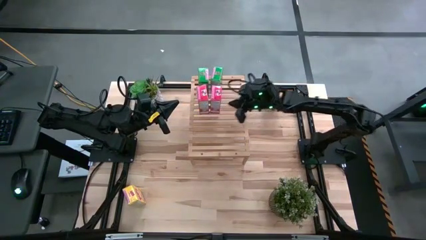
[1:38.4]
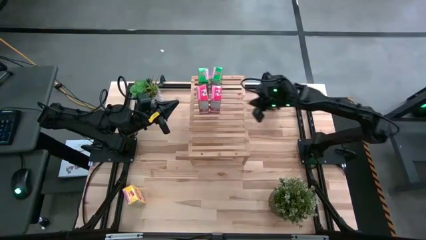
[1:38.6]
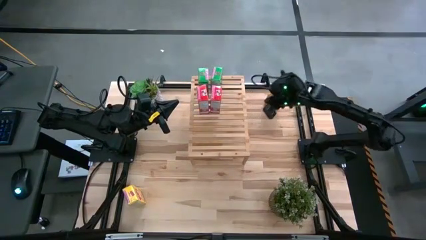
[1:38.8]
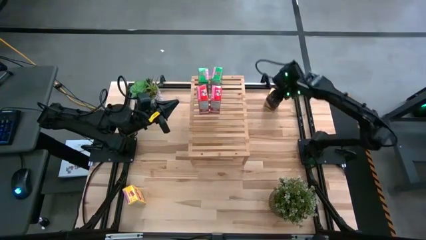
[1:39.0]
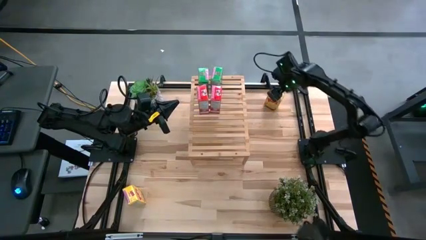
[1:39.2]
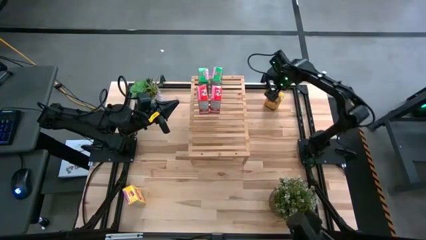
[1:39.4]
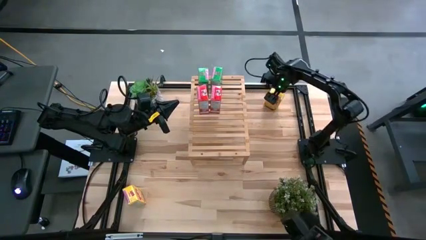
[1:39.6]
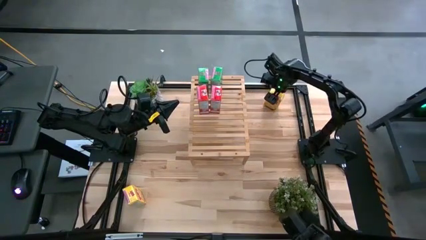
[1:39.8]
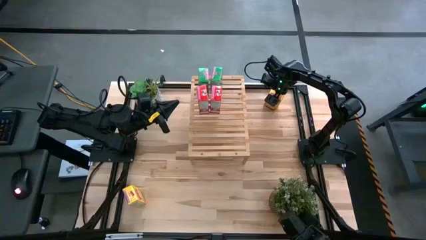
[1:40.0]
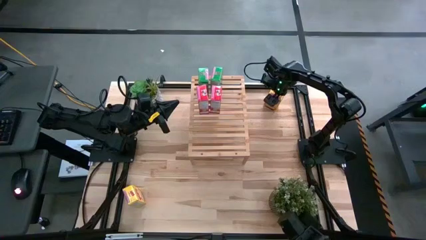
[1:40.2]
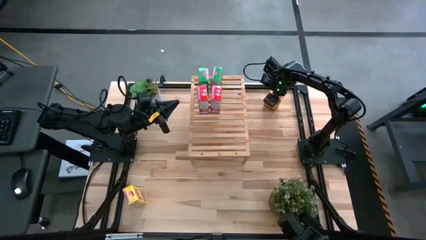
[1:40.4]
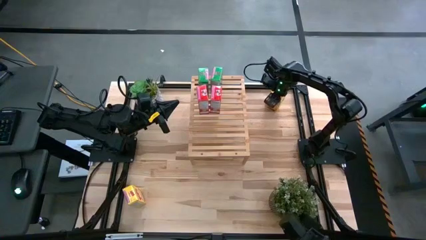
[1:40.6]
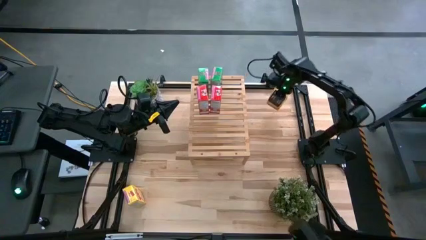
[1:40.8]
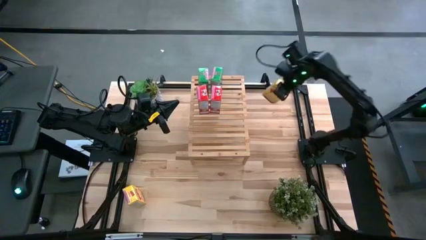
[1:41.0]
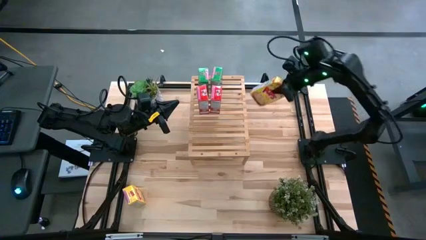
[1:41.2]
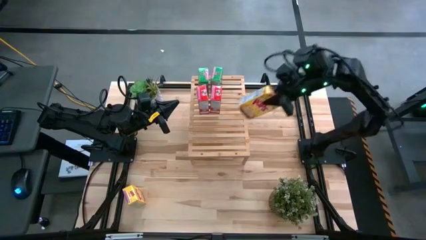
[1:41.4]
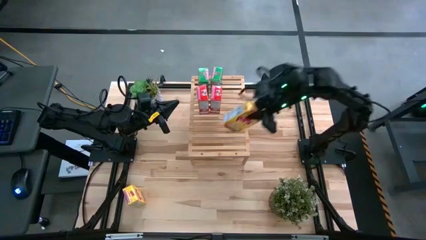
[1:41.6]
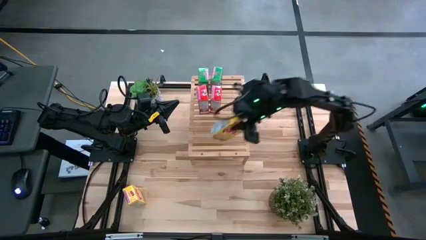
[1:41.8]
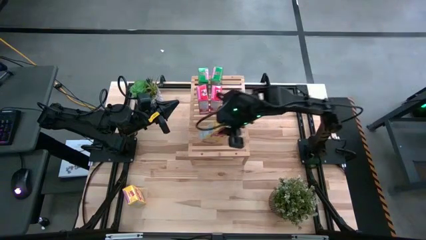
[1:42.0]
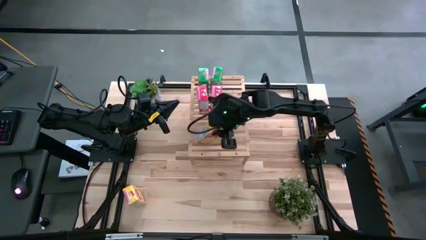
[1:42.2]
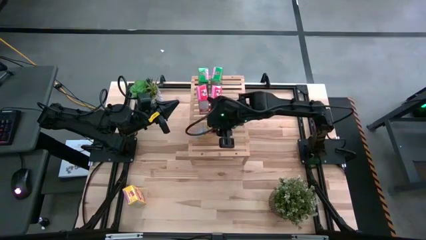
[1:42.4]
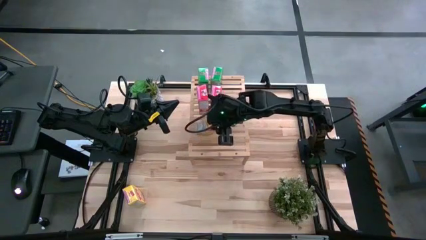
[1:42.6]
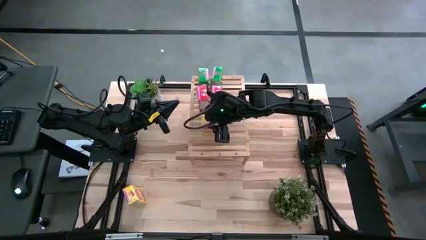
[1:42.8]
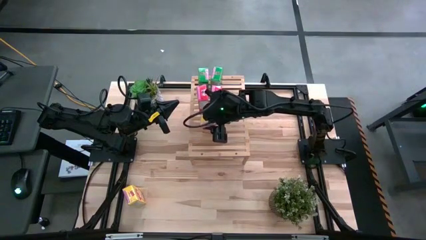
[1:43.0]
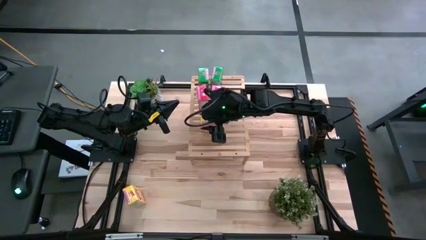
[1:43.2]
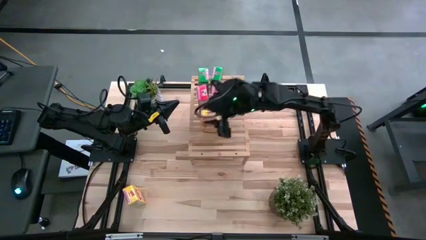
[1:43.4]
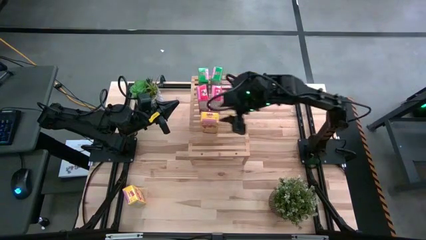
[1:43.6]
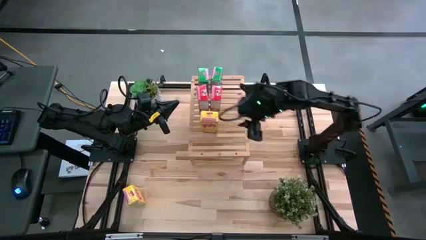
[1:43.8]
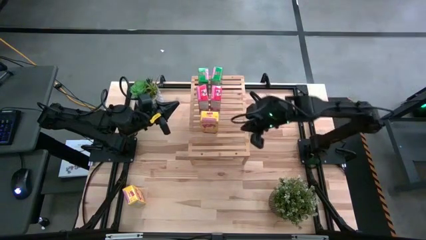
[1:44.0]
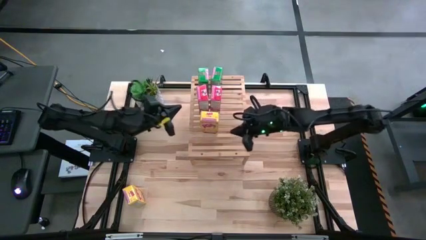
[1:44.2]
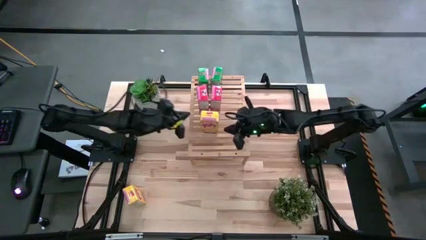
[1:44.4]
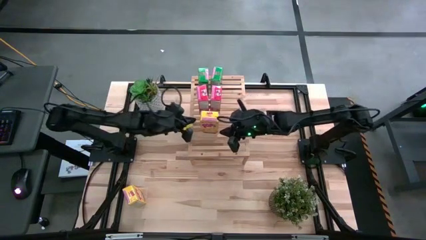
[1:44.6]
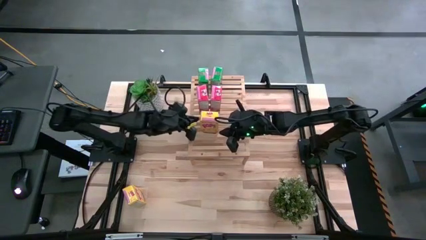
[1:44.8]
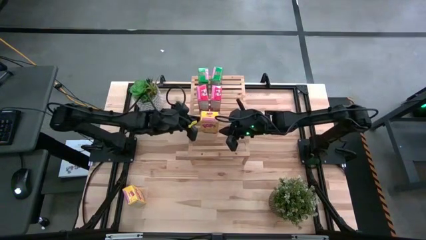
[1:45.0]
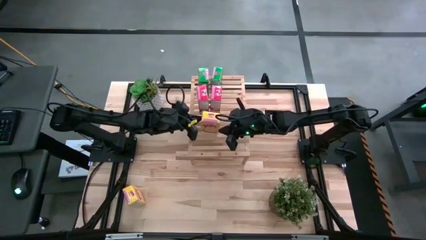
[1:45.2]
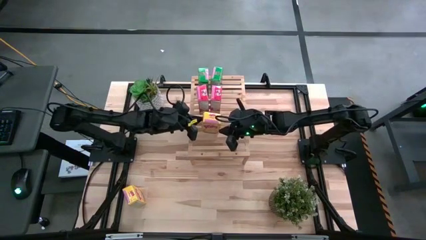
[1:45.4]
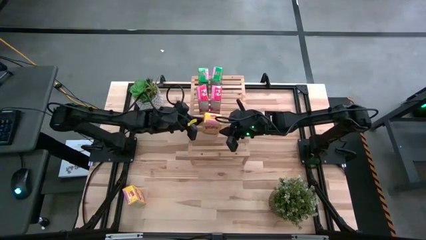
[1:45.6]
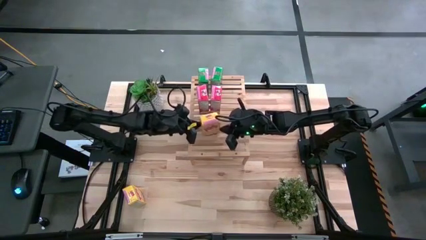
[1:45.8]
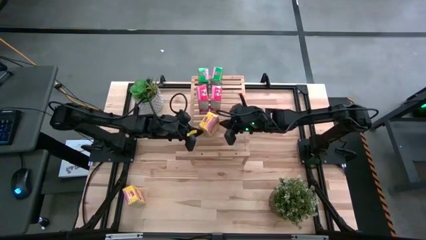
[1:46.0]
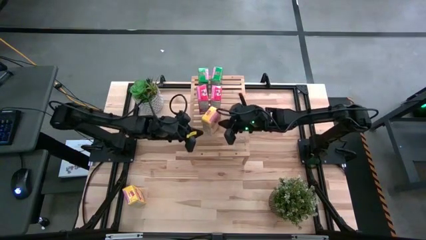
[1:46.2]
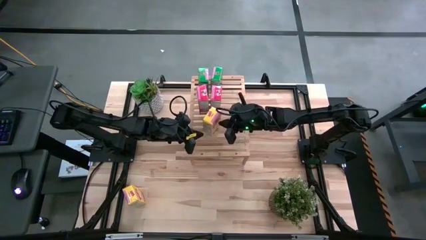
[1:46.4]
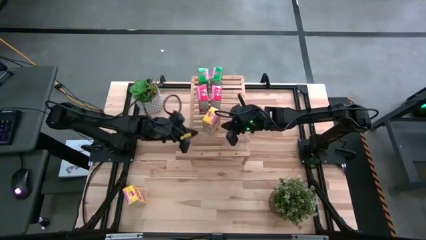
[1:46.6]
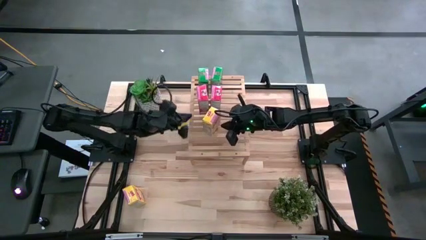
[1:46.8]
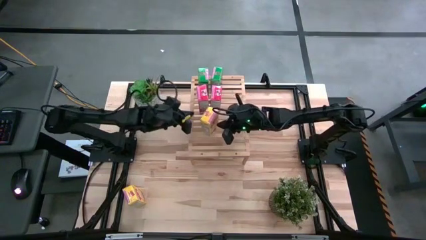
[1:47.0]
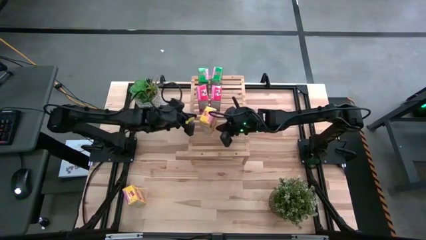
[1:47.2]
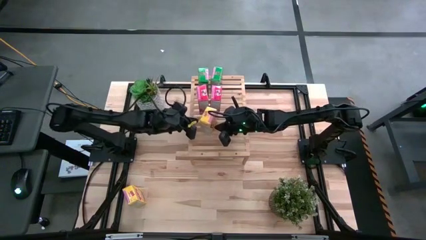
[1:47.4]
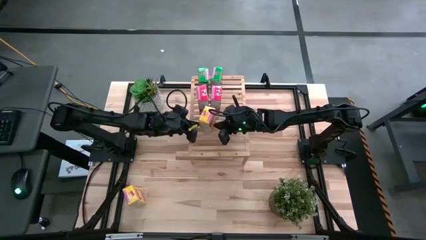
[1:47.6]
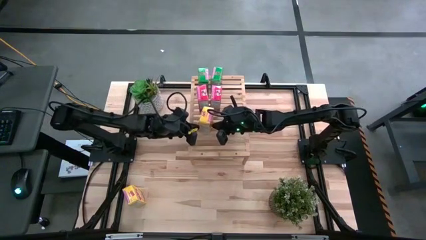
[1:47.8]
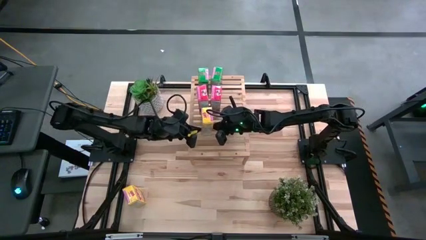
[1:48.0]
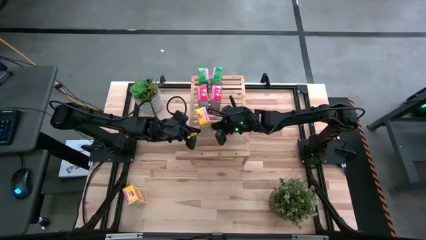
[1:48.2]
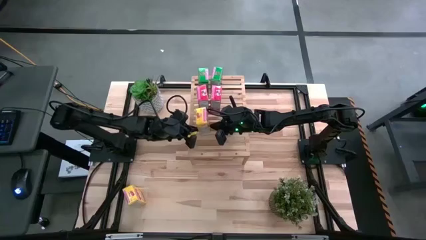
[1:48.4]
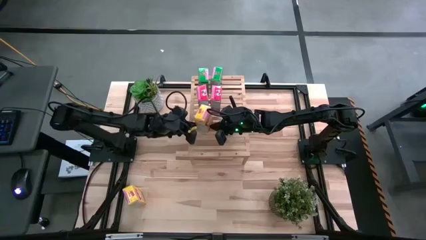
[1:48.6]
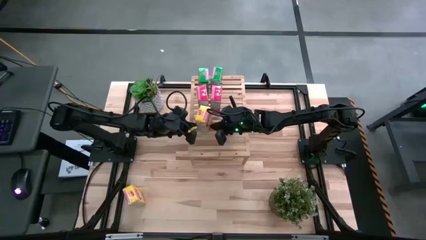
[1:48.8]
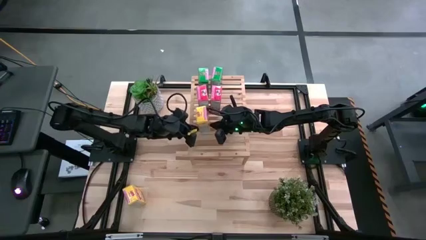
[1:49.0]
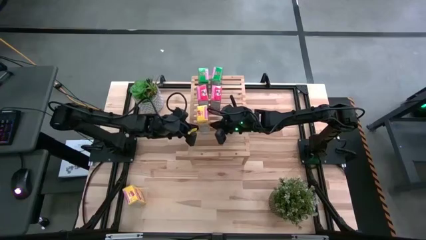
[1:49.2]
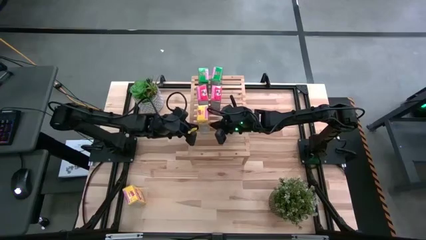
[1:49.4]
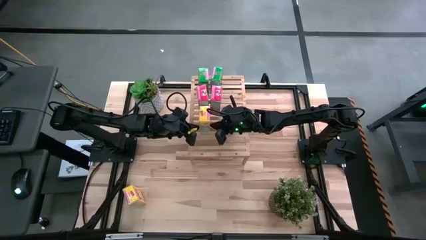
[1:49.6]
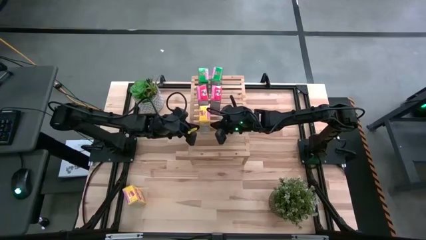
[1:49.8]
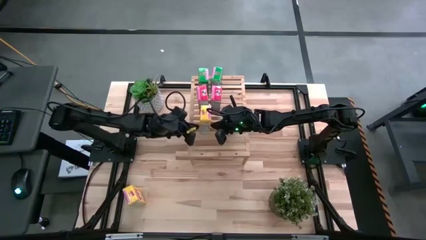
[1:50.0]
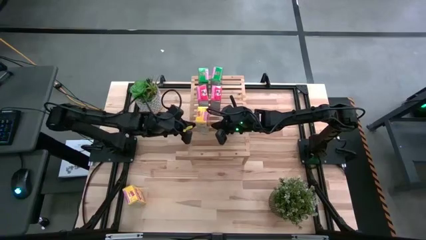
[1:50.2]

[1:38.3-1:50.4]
Task: Stack cereal on shelf
Put the top right yellow cereal box on the shelf

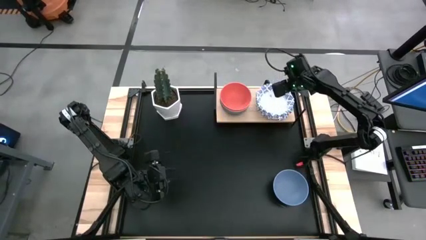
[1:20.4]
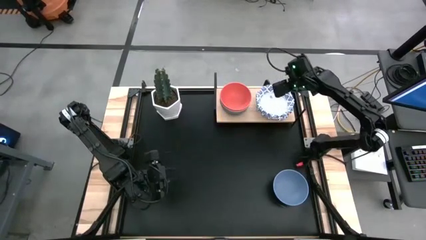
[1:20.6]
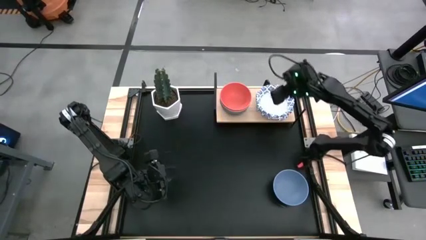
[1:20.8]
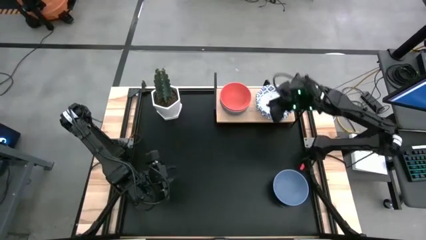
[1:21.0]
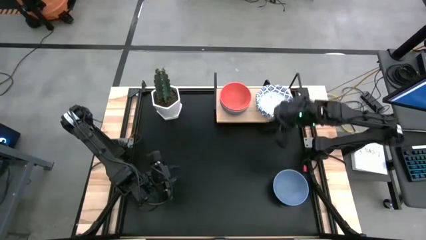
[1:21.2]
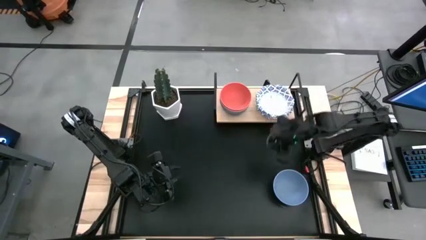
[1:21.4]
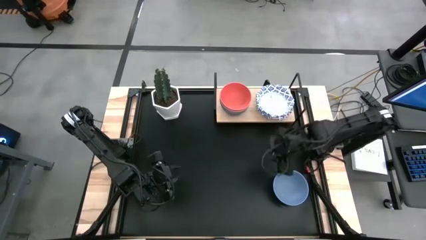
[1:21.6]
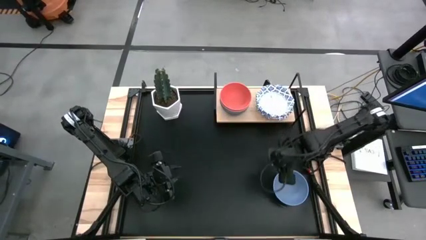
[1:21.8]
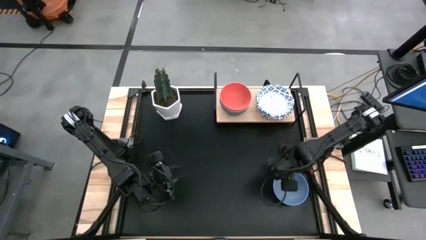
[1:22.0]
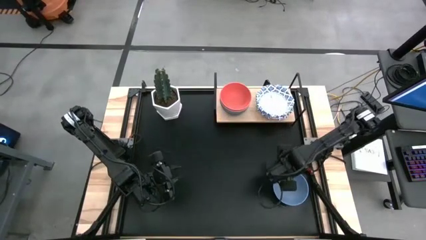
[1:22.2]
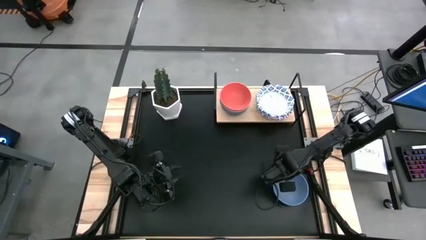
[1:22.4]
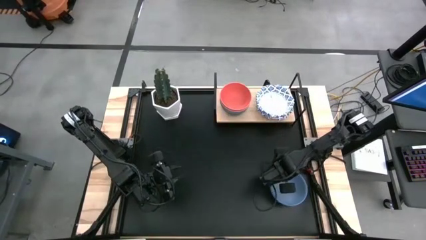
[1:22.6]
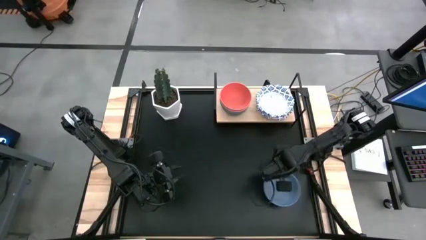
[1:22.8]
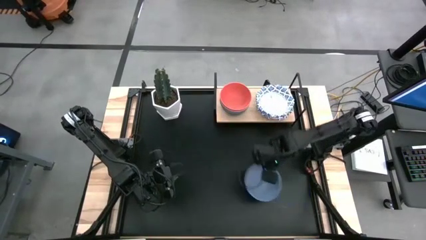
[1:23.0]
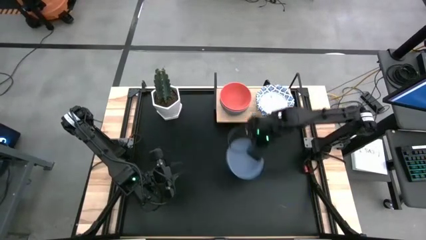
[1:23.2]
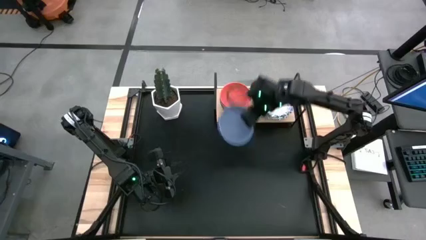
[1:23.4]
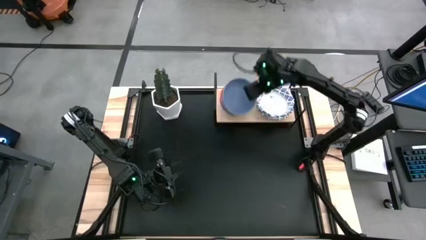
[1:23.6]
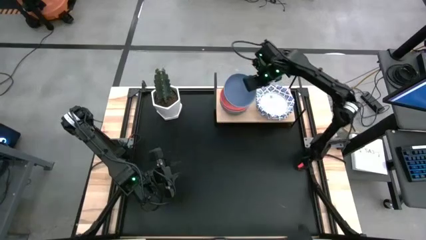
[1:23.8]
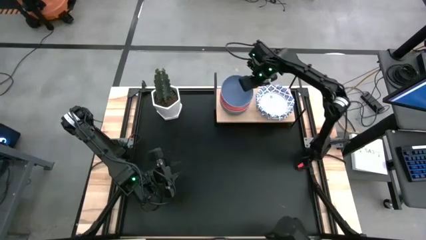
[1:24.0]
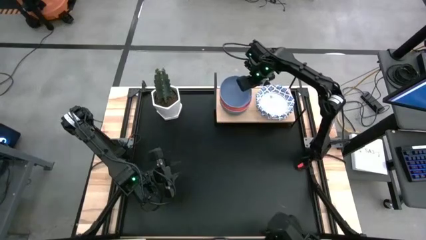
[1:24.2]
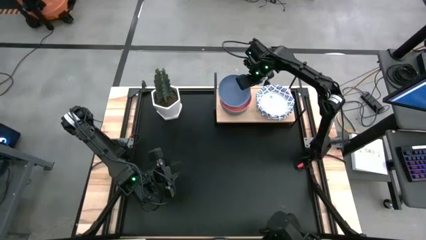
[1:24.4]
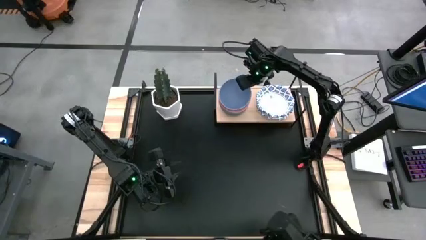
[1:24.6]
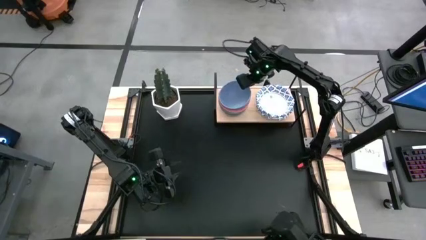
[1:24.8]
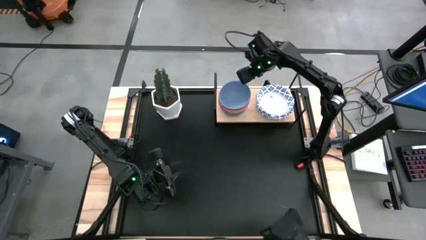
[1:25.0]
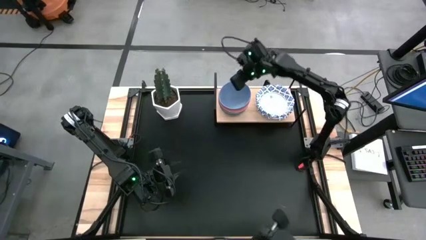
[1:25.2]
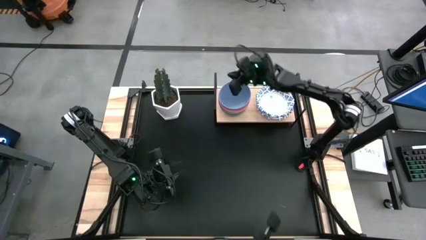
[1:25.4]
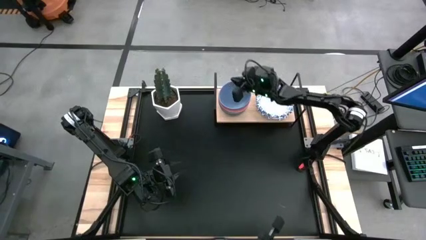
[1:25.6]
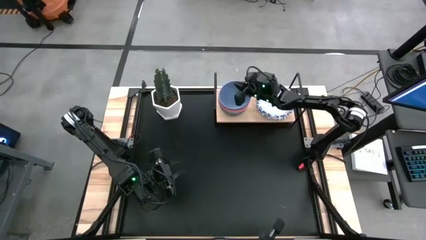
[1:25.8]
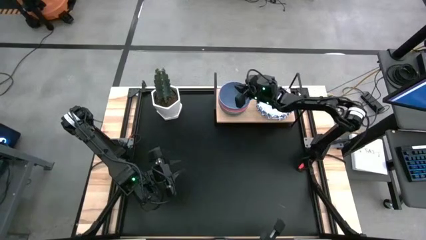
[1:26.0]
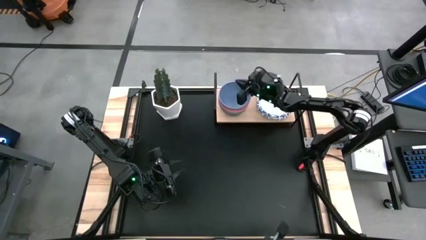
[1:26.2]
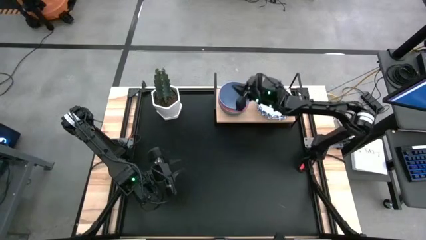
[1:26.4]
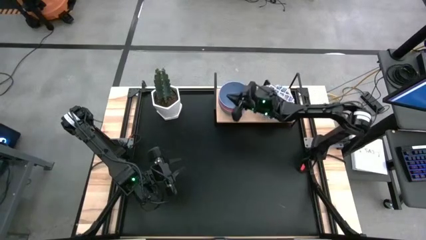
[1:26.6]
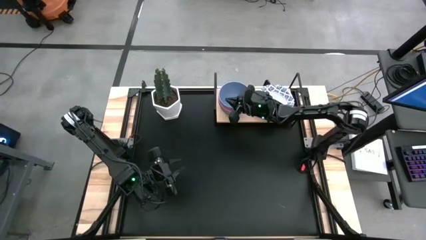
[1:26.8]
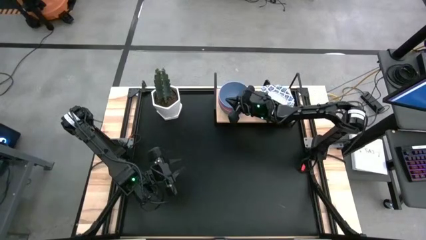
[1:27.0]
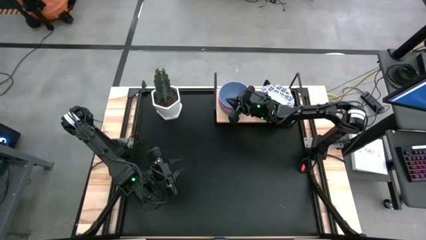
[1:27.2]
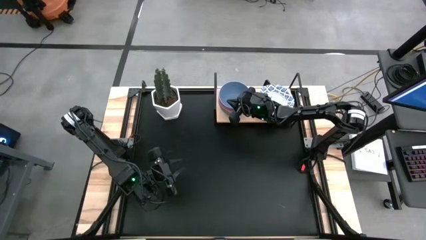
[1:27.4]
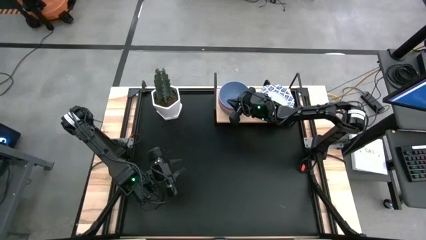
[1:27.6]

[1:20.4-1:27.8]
Task: Place and stack bowls onto a shelf
Stack the blue bowl on top of the orange bowl on the shelf
